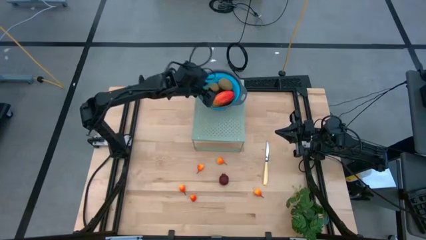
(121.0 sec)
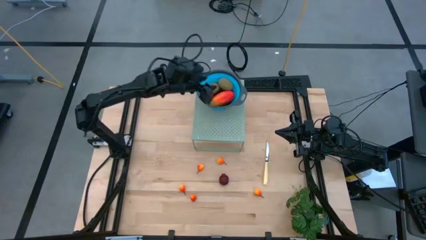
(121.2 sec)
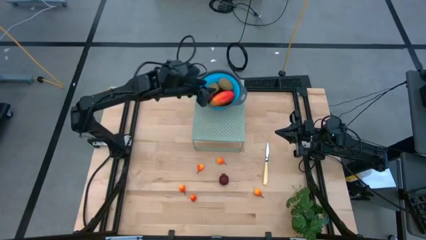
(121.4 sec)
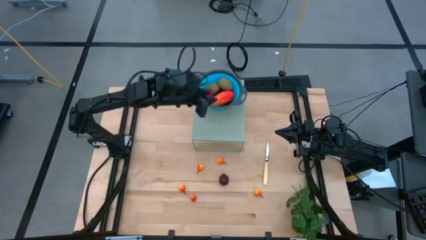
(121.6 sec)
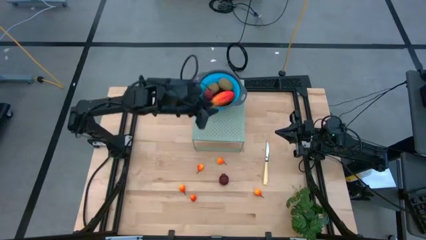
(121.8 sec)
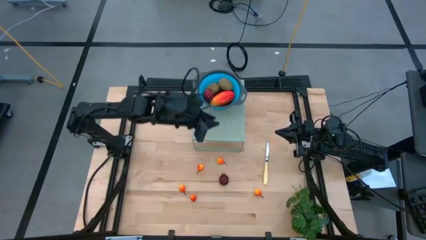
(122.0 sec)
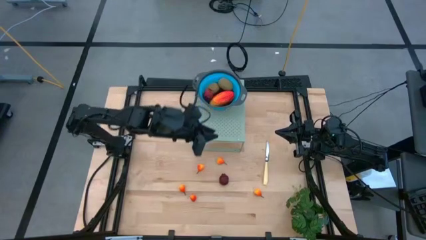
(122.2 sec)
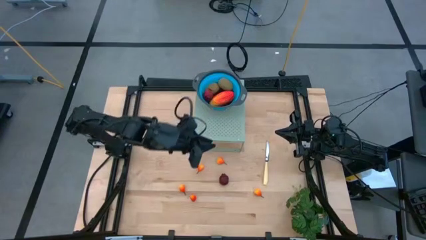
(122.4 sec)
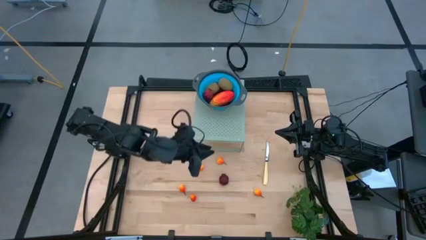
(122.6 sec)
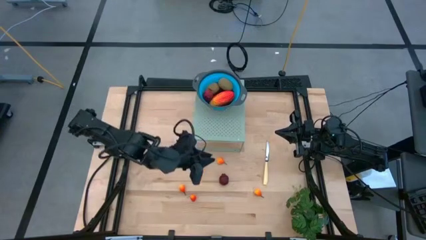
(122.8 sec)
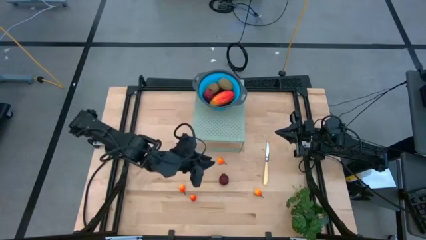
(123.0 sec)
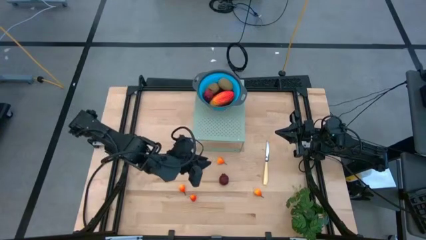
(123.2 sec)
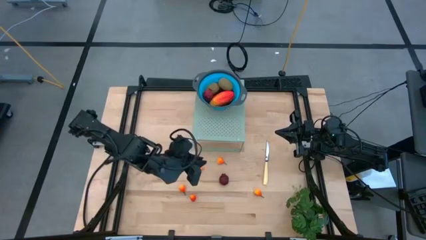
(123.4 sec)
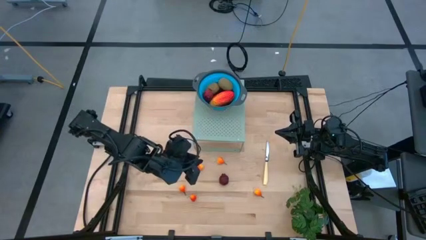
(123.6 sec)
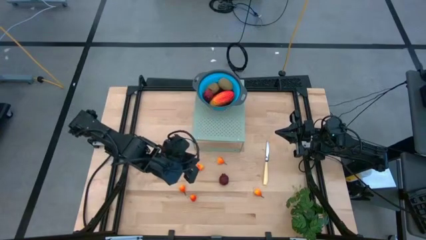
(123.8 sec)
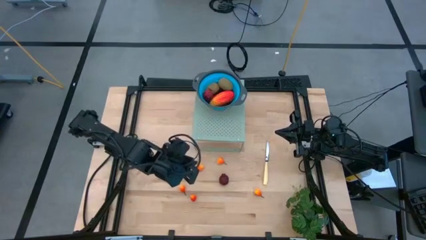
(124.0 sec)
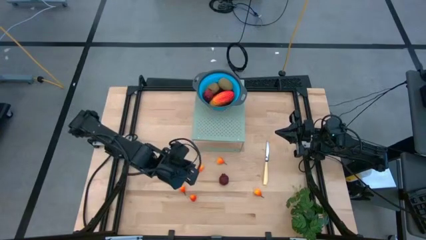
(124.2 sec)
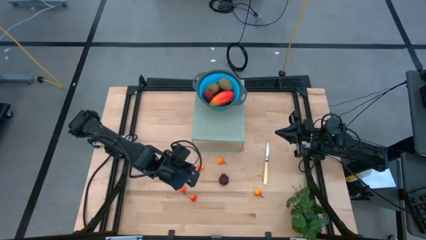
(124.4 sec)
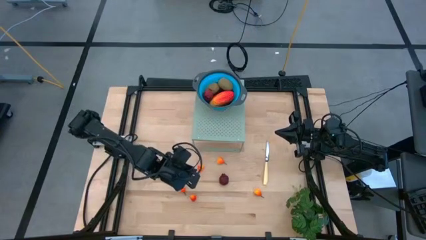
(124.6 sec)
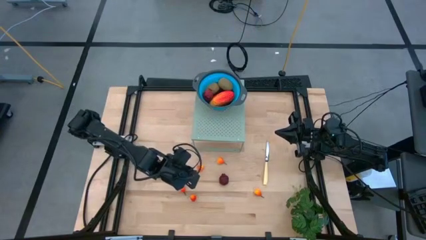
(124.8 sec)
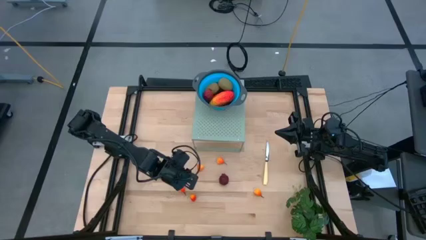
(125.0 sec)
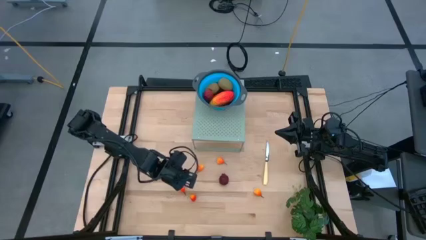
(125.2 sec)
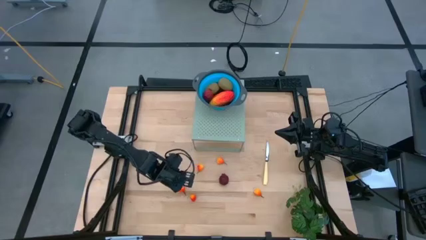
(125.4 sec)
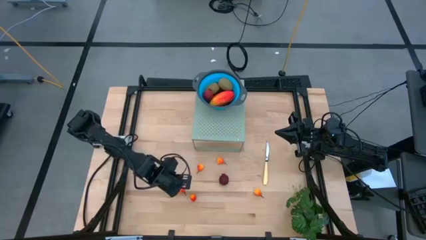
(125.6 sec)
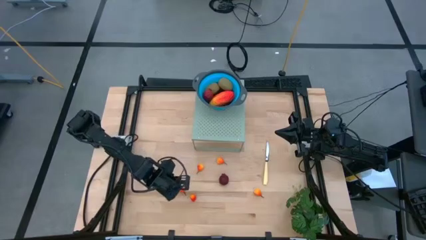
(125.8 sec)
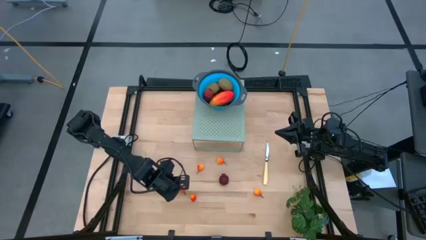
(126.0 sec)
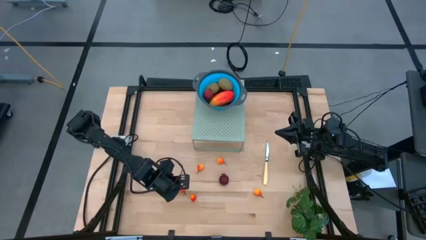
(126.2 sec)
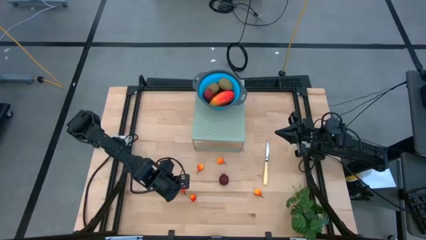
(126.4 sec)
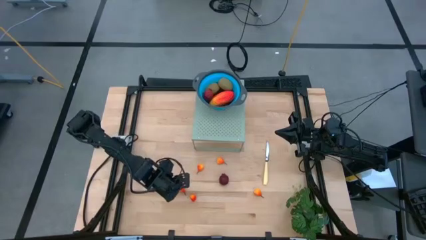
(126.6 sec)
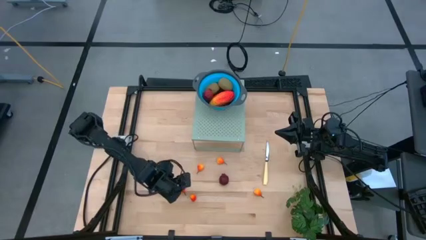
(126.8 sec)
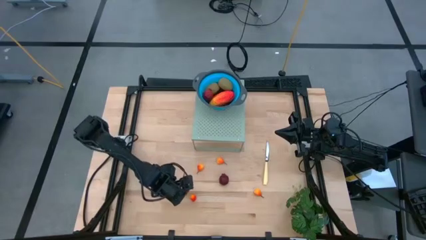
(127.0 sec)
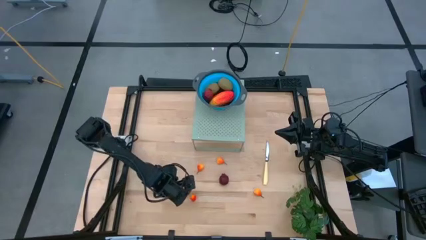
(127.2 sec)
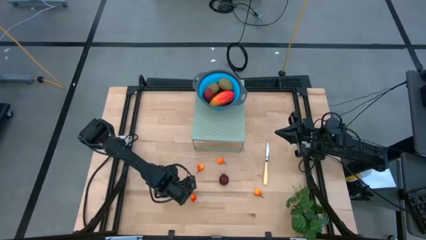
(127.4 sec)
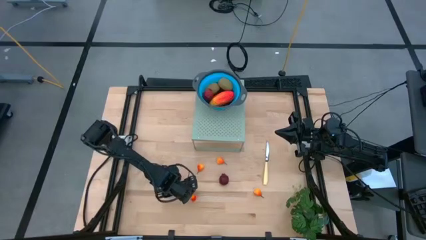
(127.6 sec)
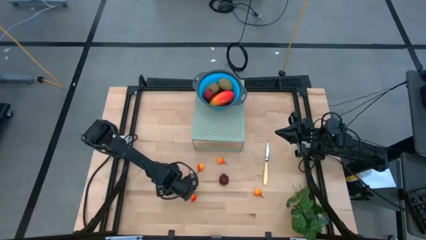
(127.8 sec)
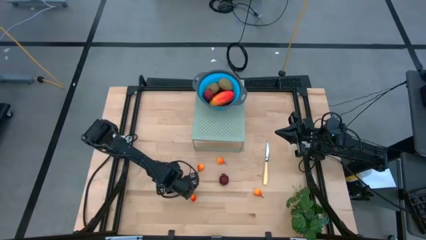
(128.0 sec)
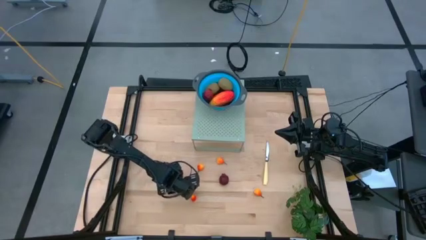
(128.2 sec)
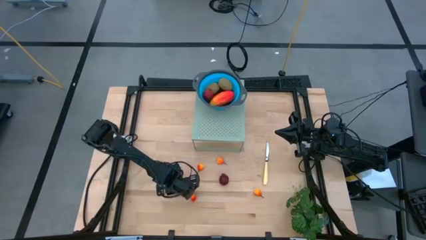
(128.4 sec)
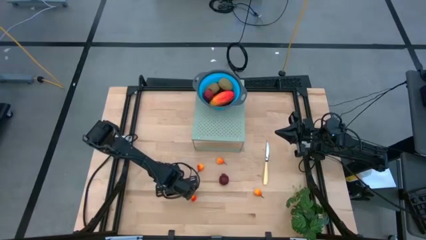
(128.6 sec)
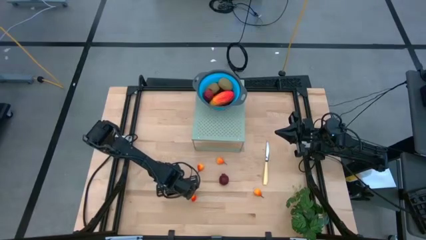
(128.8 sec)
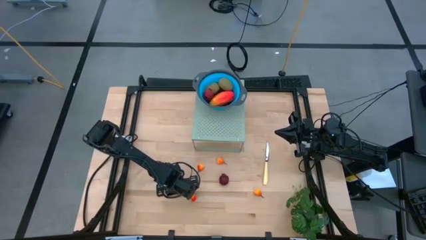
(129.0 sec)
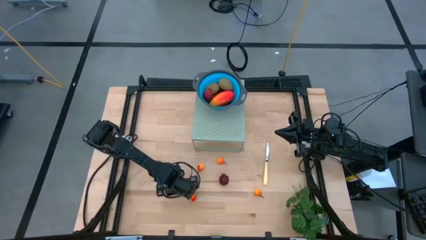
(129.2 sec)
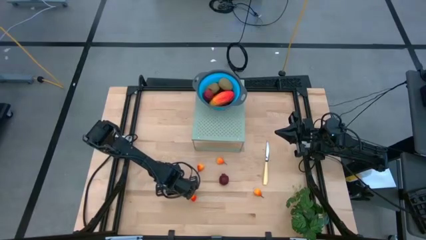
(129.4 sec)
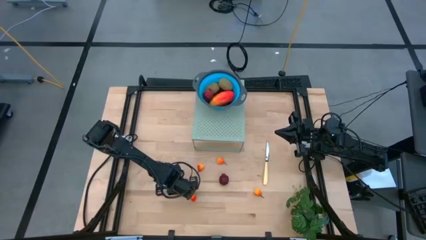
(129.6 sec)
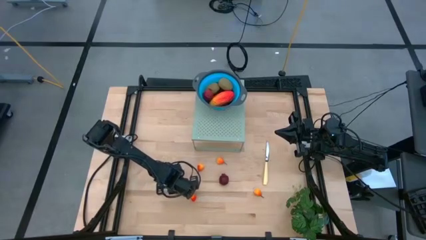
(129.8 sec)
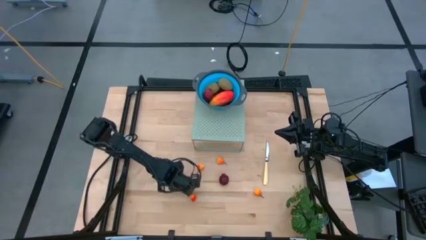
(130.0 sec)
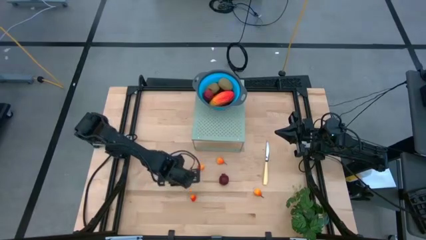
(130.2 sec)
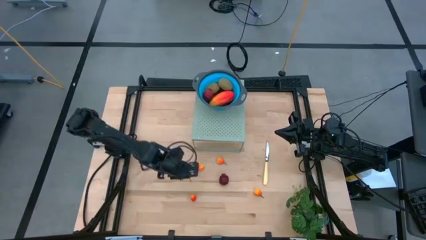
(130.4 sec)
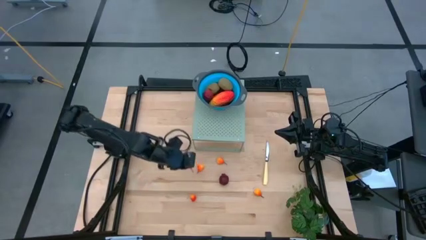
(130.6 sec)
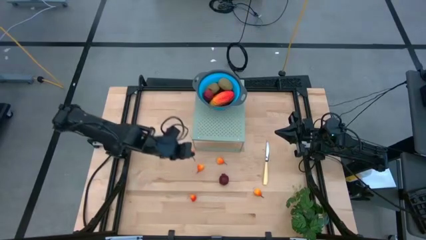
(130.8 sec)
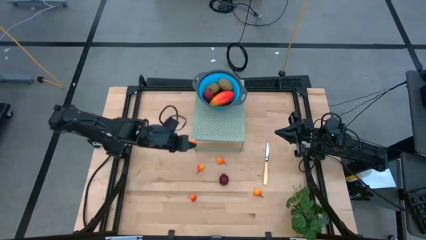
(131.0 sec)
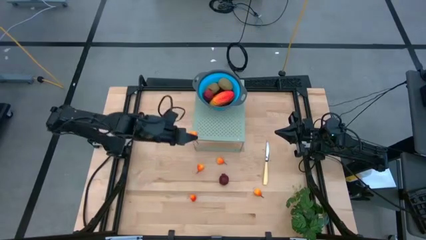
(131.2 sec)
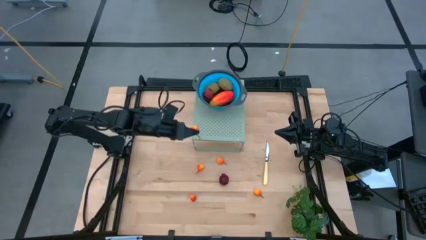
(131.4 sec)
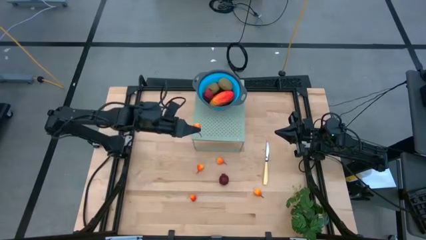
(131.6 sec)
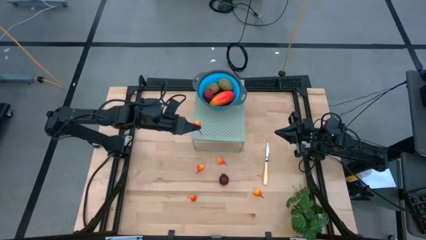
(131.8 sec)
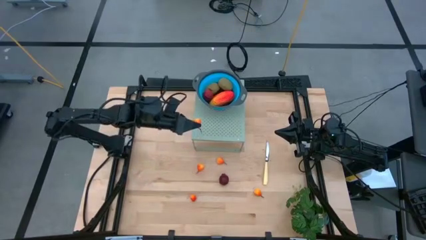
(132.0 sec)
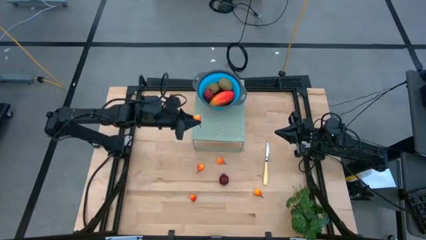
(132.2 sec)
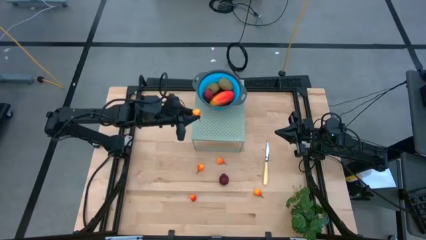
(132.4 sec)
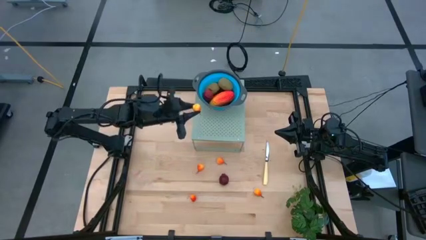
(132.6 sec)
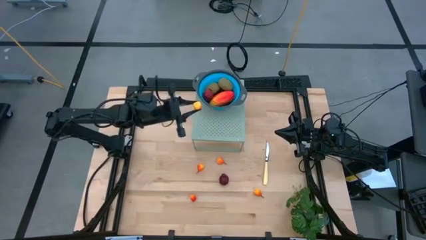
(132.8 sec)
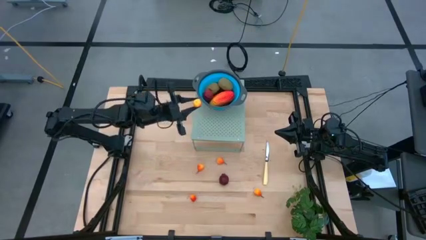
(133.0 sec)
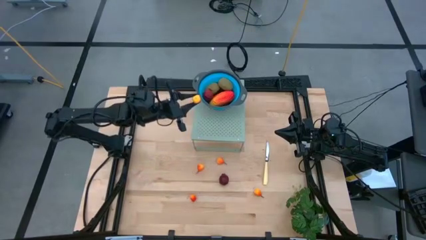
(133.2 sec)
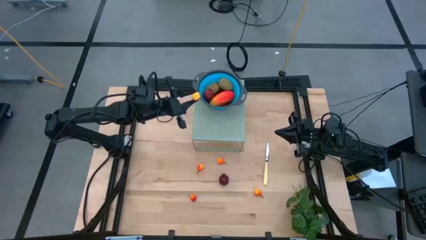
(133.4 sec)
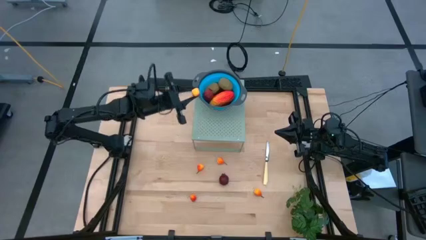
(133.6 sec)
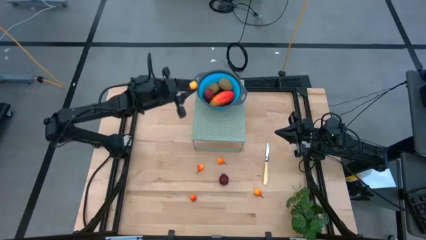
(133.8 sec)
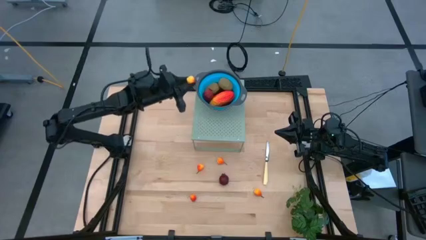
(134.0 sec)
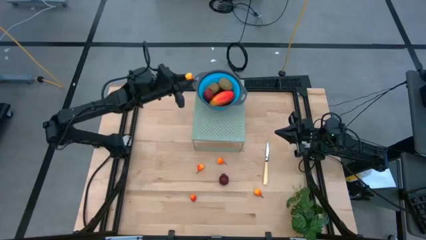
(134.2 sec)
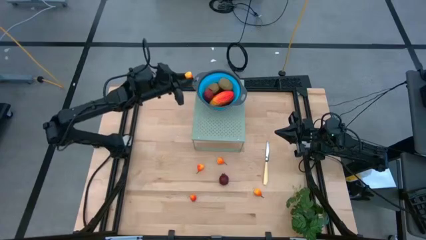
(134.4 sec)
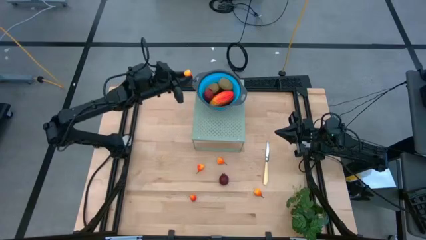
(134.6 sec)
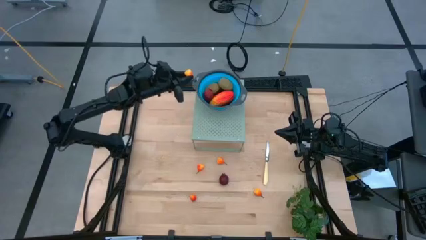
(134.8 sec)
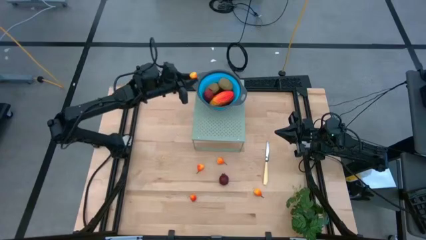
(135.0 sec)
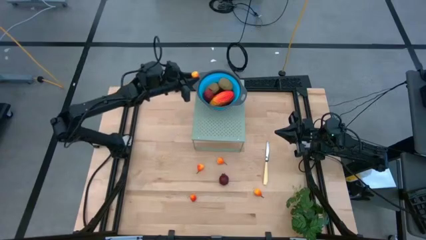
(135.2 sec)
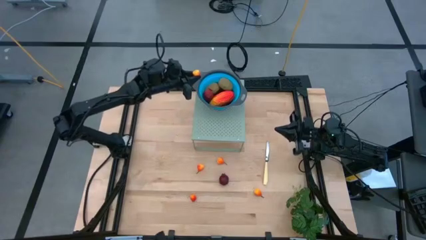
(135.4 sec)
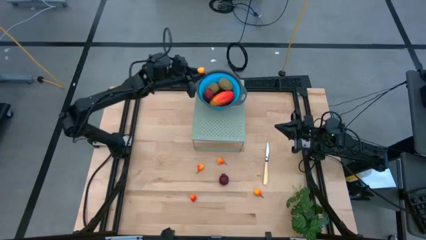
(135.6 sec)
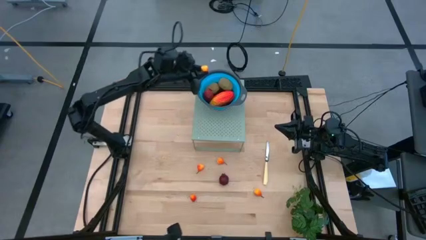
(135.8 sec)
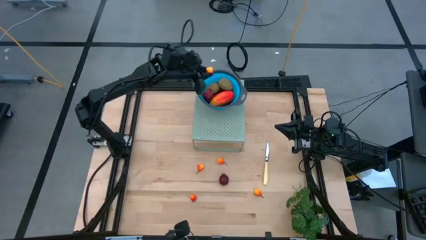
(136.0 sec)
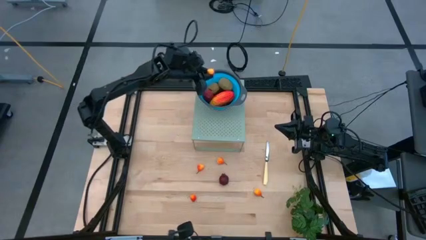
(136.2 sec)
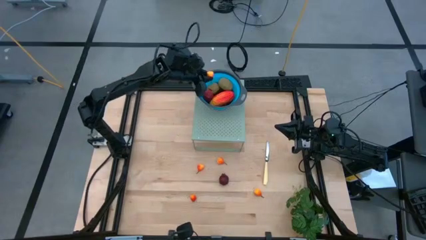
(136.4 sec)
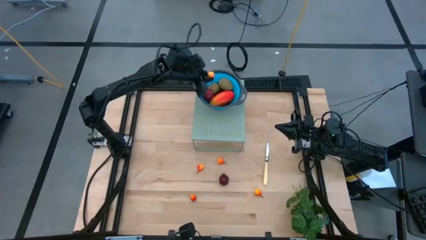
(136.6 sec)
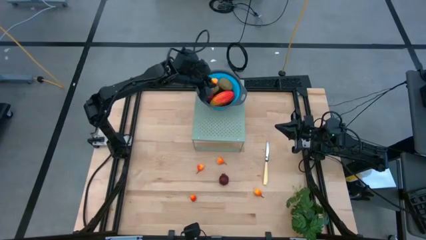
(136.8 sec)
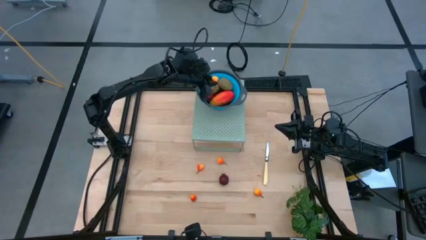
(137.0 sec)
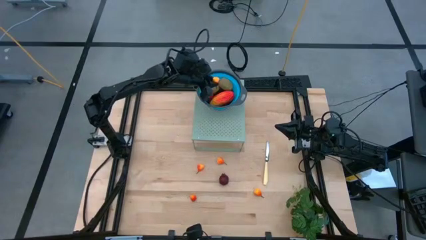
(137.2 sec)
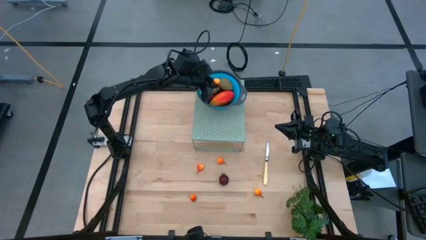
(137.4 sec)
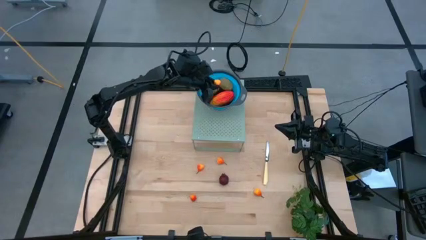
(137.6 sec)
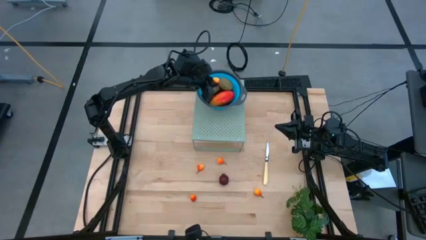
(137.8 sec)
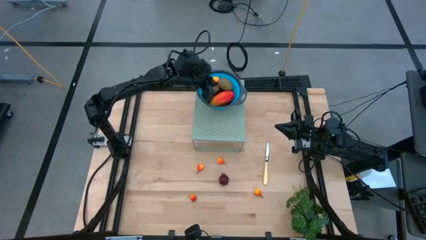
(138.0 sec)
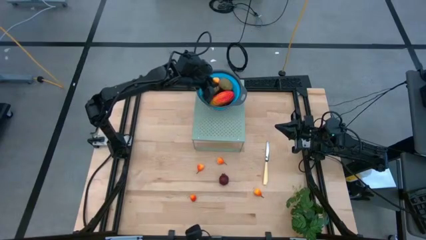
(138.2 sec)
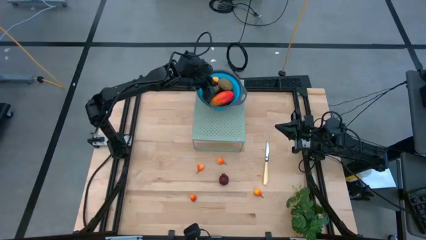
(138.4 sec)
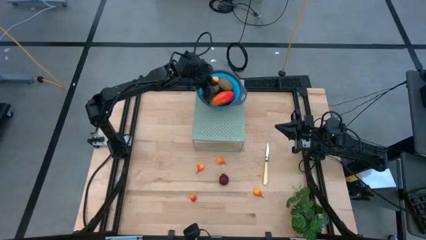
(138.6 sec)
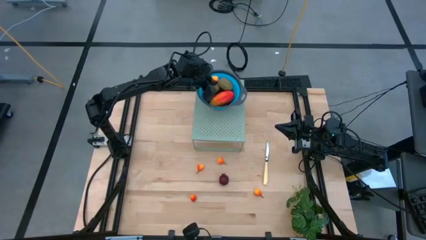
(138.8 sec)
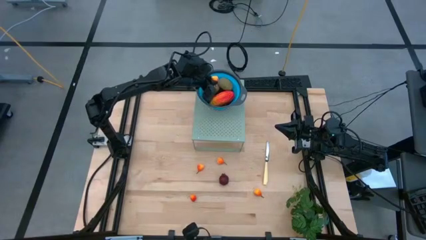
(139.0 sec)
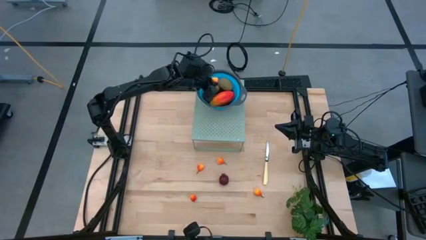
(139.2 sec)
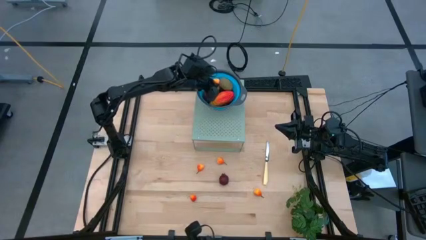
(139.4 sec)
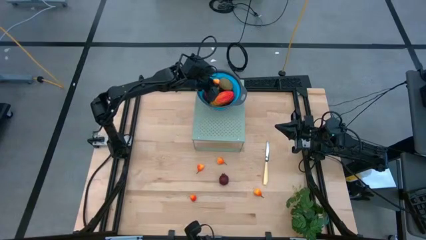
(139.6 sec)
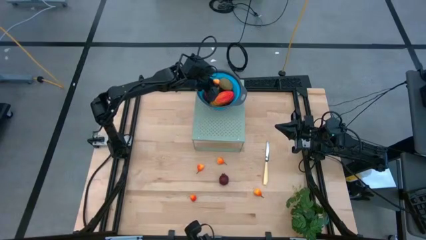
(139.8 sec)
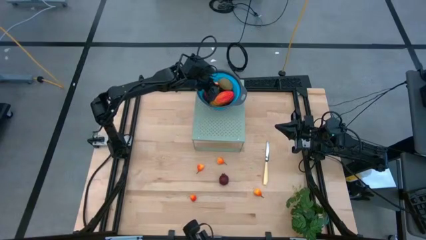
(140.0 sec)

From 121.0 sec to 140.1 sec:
Task: Pick & Place Fruit
Put the peach into the blue strainer bowl on the shelf
